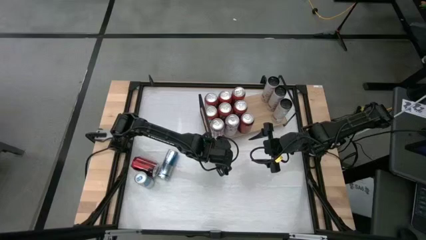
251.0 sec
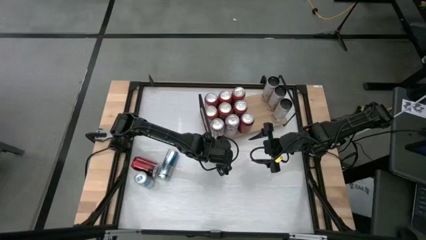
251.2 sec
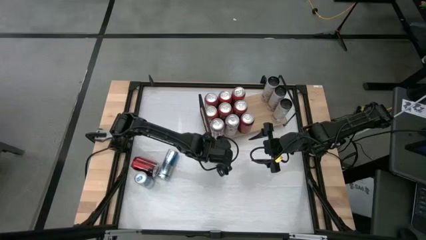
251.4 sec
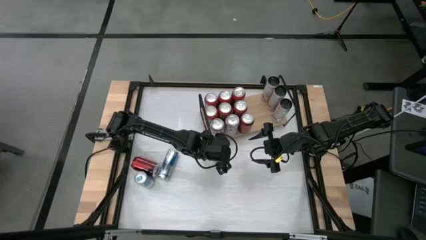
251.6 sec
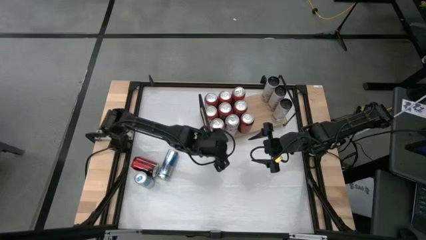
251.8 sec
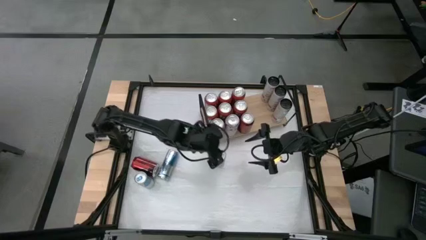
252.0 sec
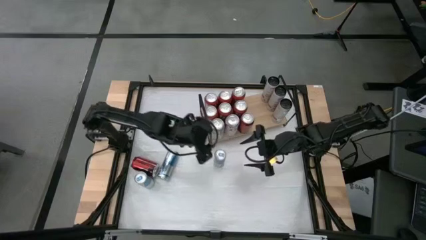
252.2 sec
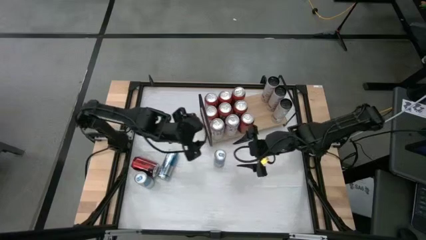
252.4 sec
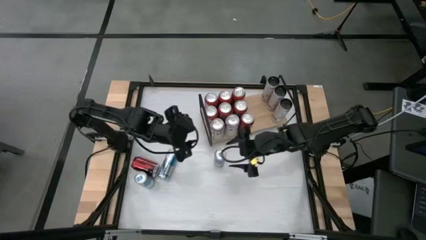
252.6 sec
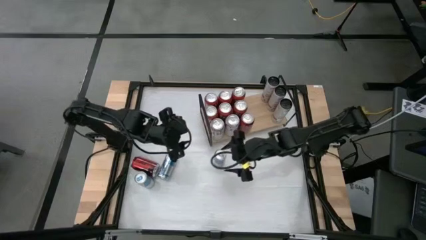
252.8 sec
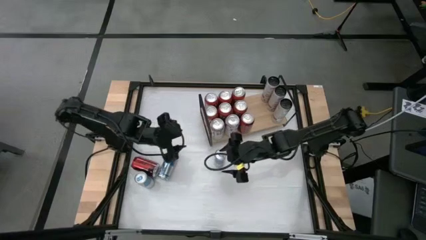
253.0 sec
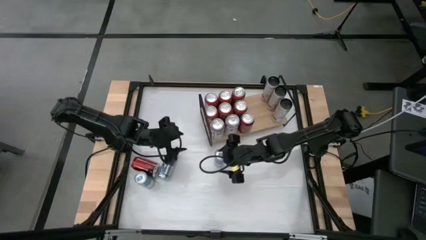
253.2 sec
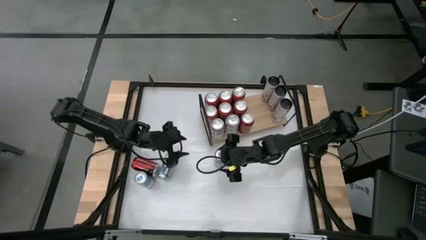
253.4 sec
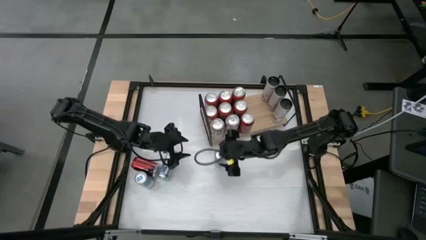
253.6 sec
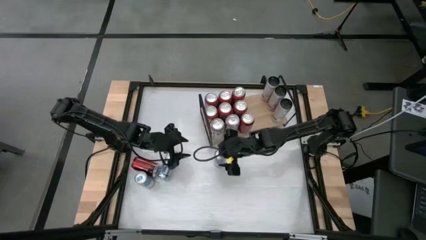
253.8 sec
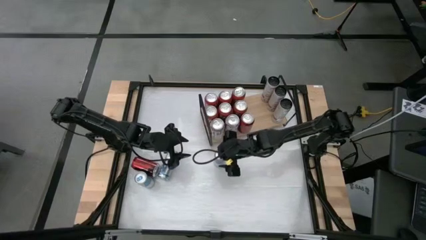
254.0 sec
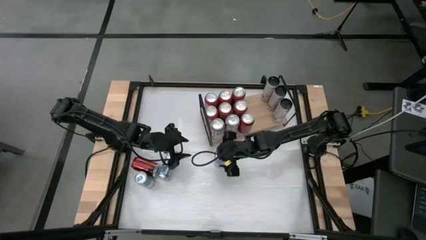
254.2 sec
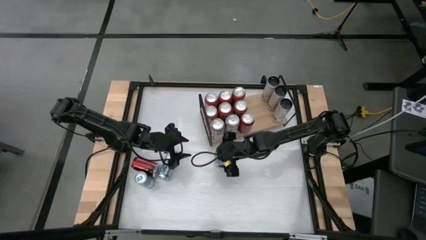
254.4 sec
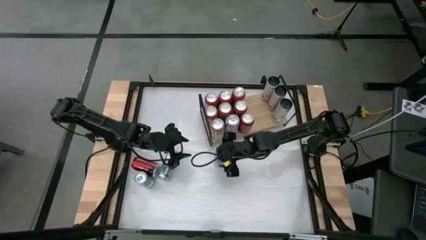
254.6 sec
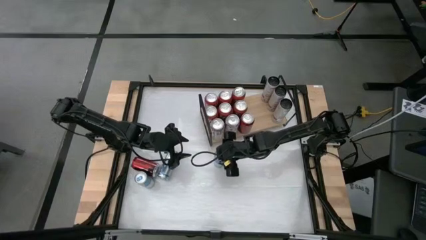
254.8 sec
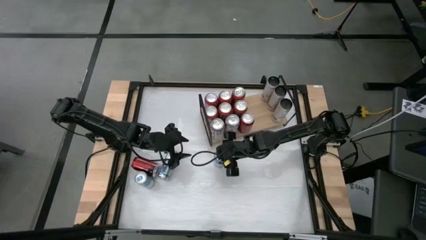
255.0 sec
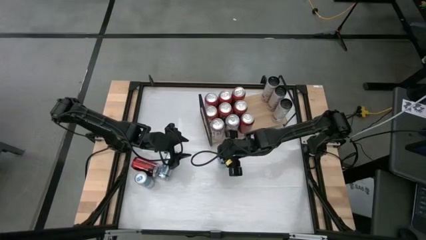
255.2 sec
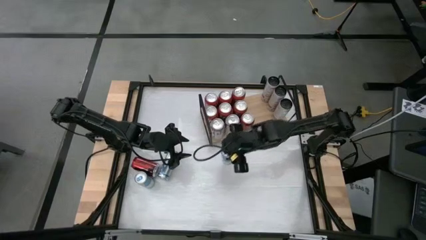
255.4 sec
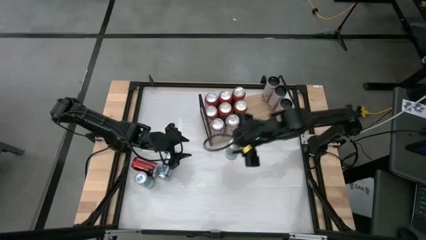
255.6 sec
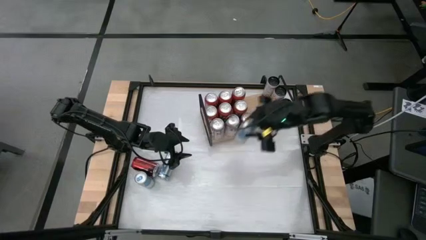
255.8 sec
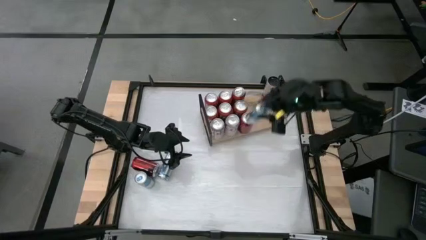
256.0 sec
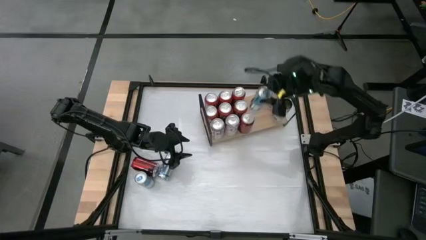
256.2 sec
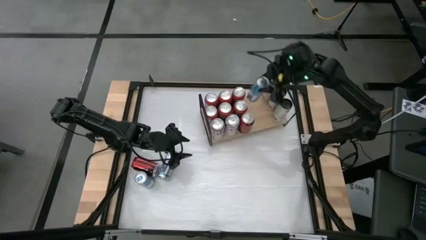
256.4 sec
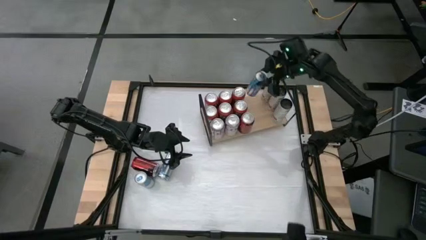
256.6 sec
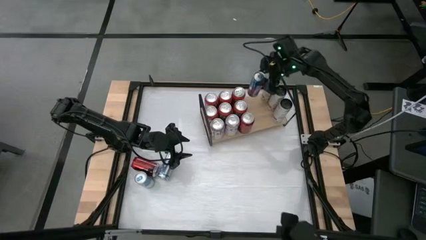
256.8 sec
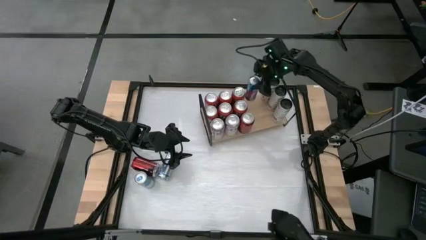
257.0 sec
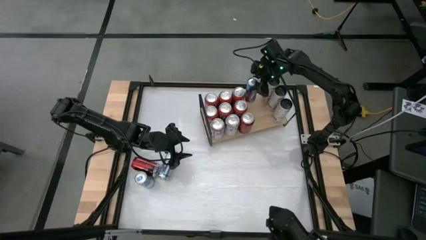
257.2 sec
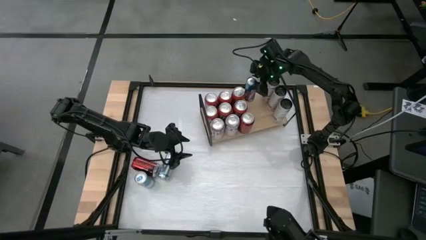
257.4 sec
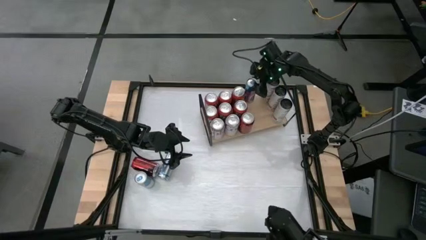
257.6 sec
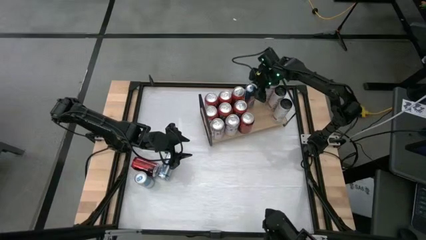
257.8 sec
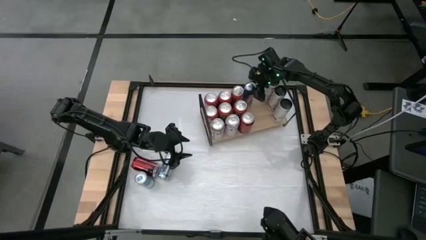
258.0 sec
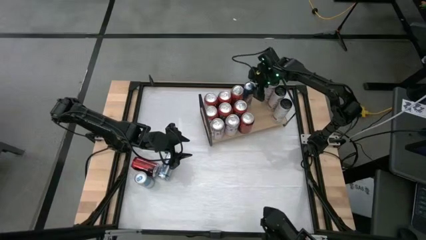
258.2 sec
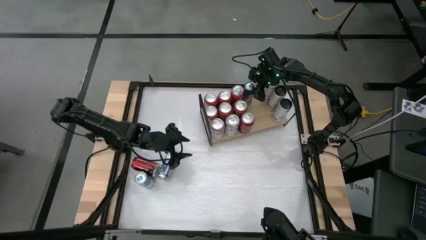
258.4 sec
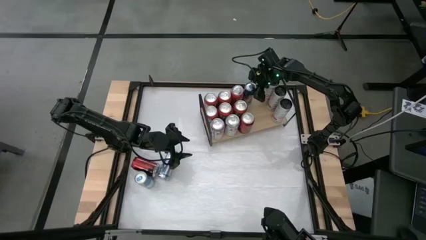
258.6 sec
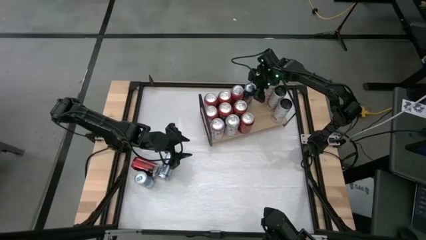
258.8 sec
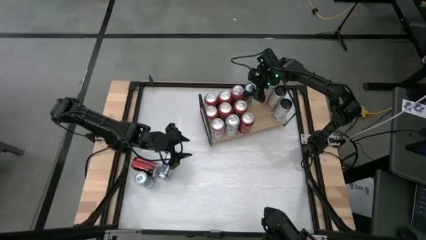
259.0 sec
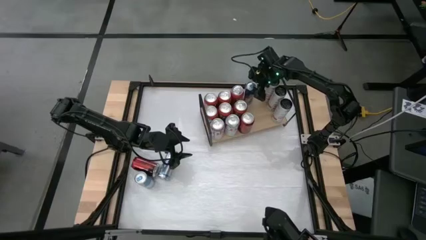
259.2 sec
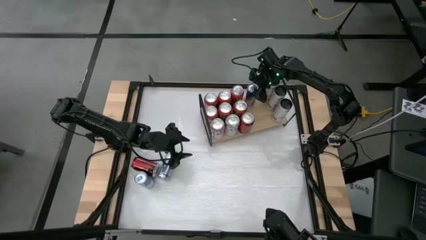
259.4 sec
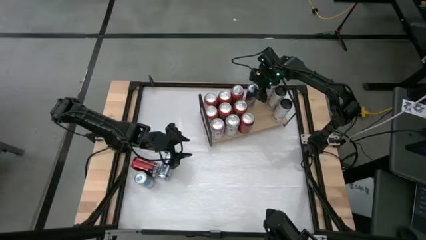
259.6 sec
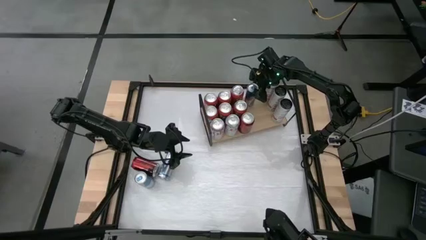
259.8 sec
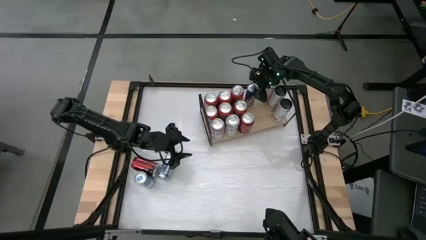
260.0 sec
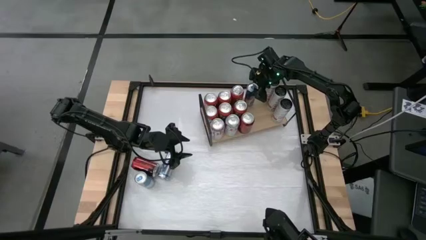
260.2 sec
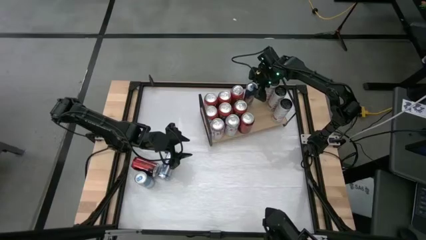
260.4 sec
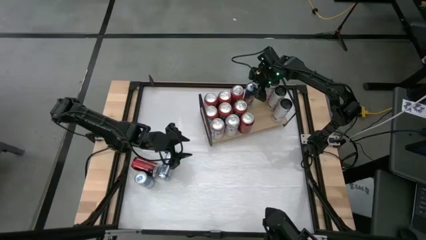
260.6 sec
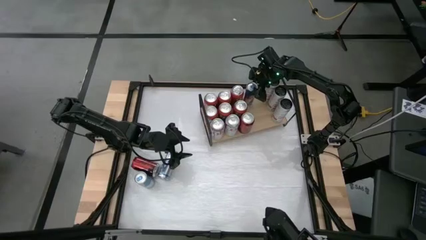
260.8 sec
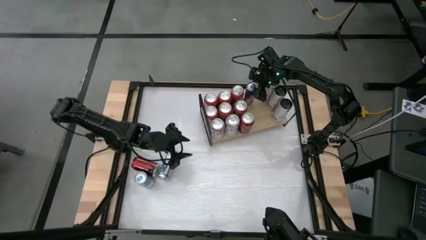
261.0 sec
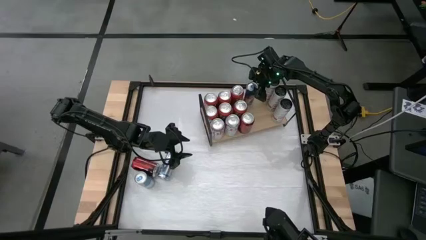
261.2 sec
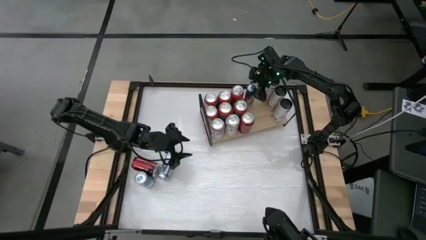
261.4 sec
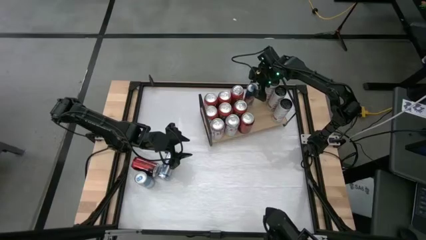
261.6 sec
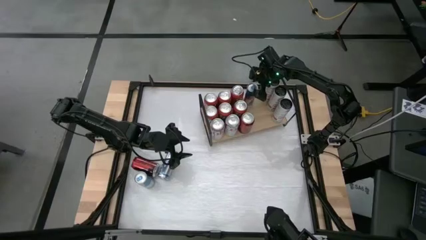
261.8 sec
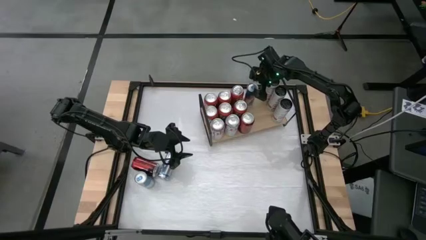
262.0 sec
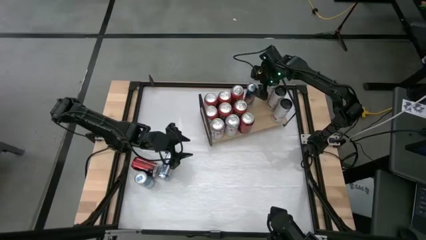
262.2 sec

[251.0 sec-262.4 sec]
Task: Place canned beverage on shelf
Put the right blue soda can on the shelf
